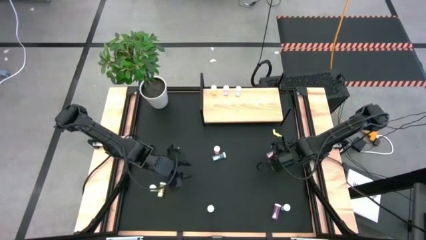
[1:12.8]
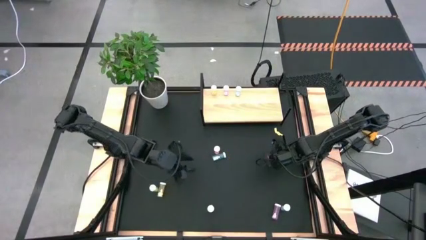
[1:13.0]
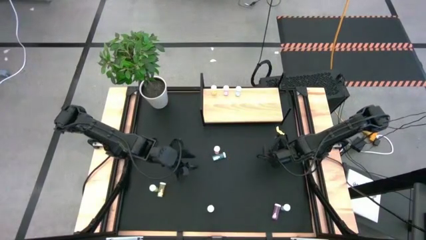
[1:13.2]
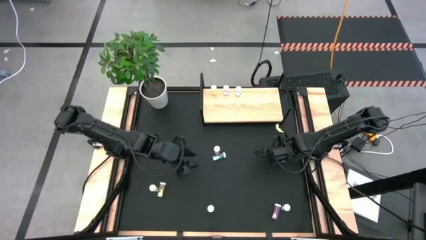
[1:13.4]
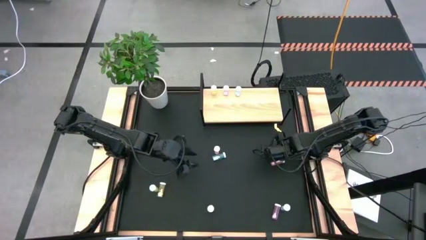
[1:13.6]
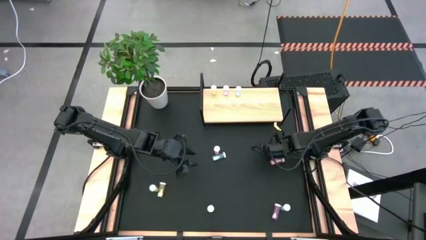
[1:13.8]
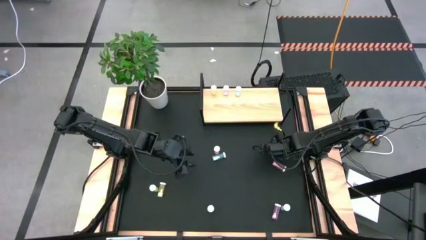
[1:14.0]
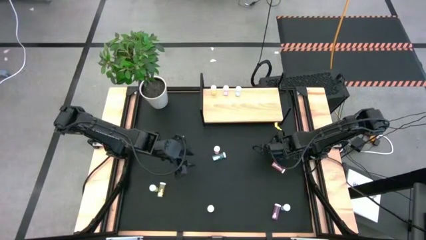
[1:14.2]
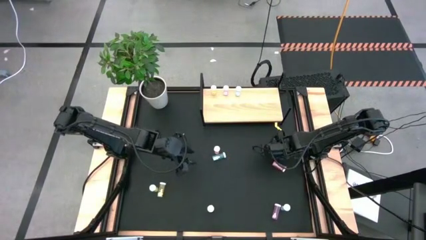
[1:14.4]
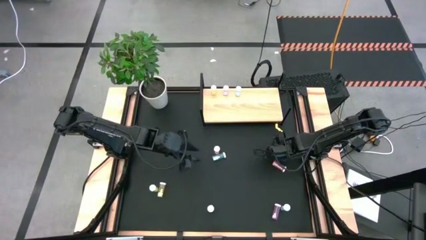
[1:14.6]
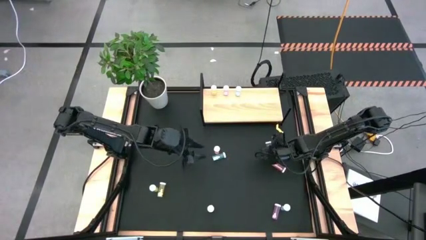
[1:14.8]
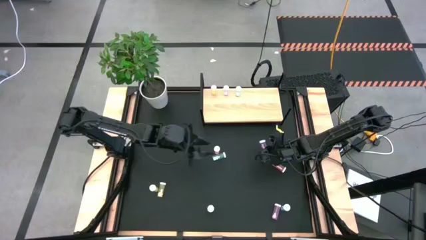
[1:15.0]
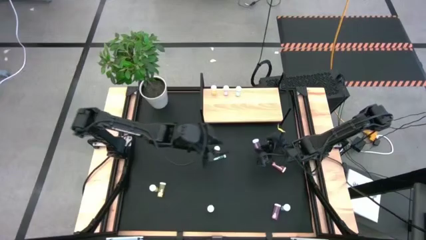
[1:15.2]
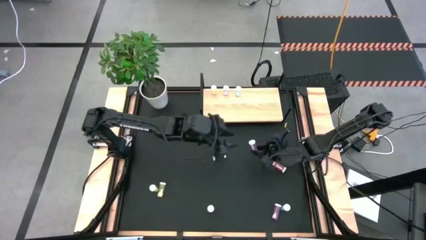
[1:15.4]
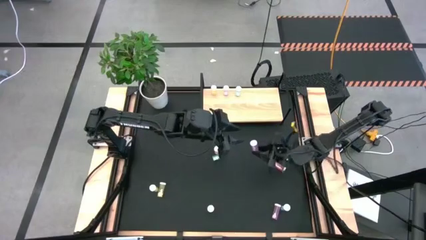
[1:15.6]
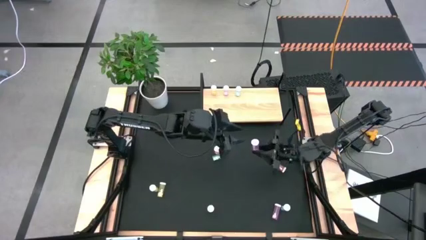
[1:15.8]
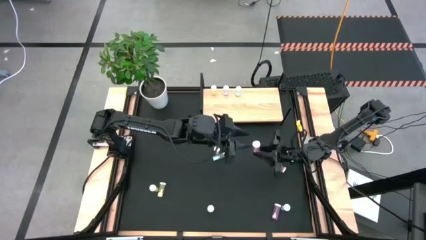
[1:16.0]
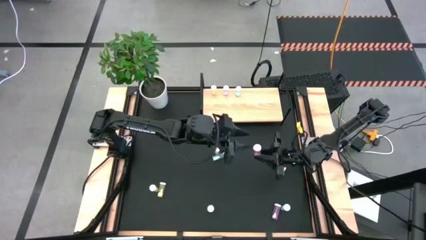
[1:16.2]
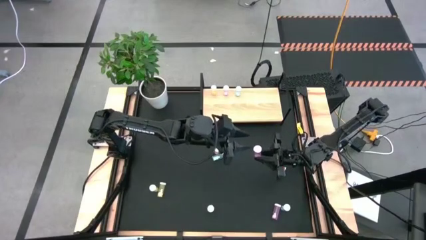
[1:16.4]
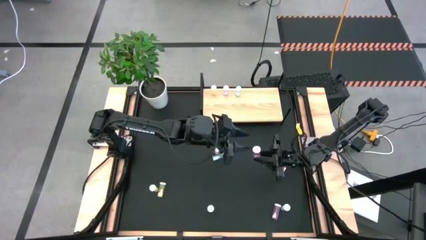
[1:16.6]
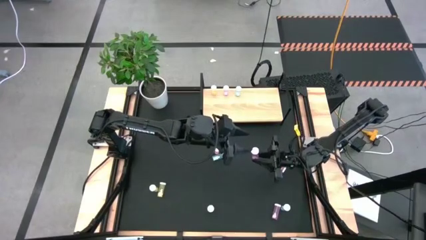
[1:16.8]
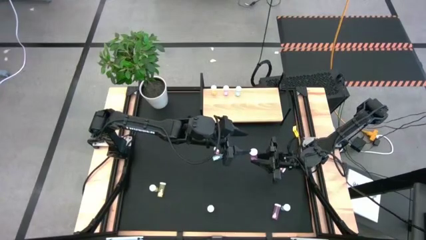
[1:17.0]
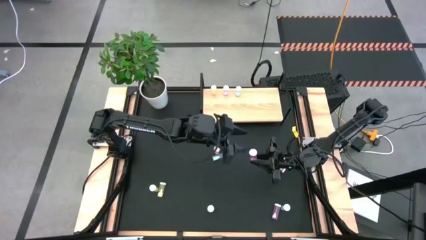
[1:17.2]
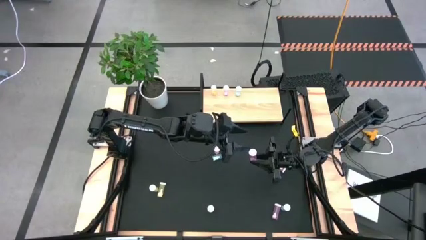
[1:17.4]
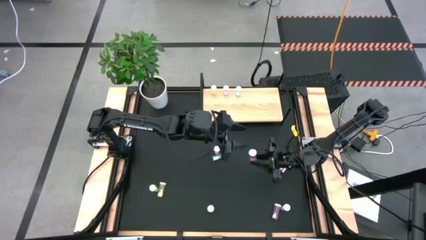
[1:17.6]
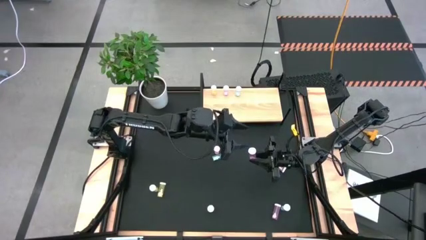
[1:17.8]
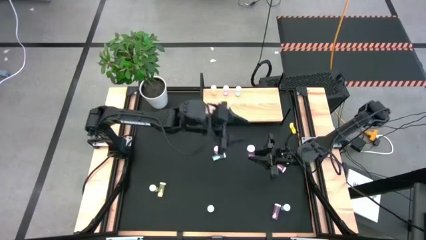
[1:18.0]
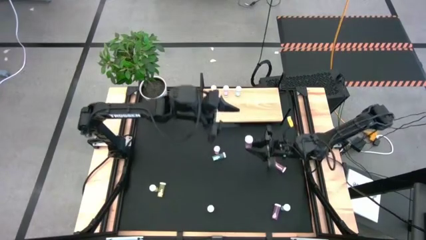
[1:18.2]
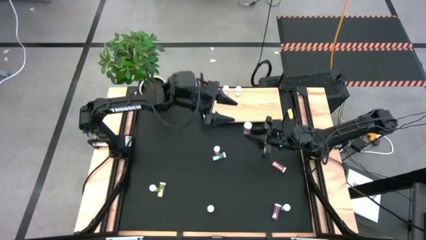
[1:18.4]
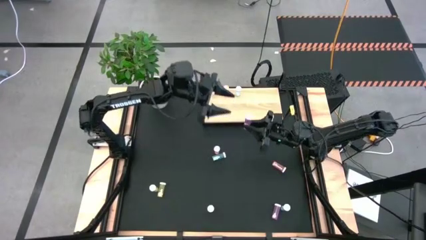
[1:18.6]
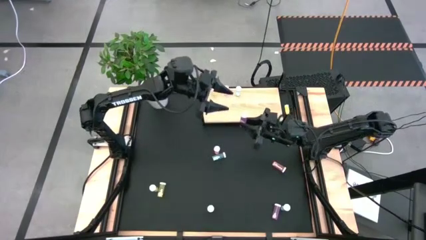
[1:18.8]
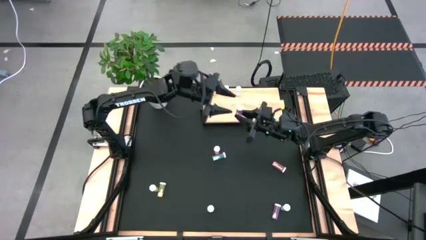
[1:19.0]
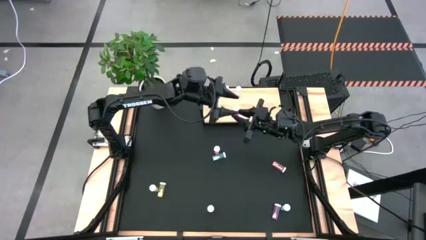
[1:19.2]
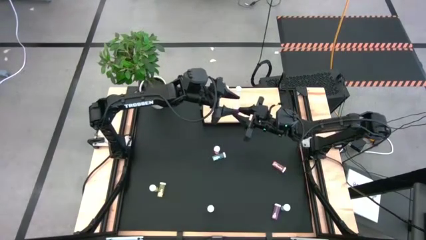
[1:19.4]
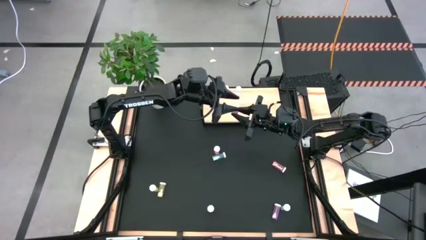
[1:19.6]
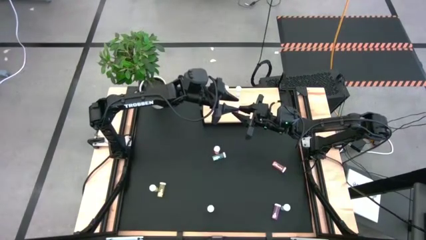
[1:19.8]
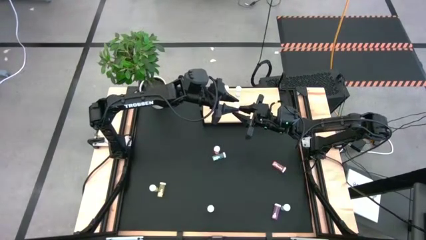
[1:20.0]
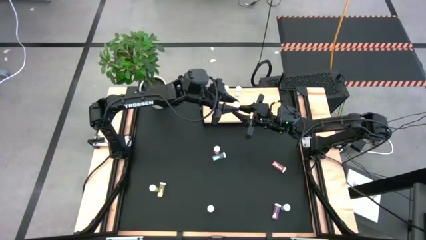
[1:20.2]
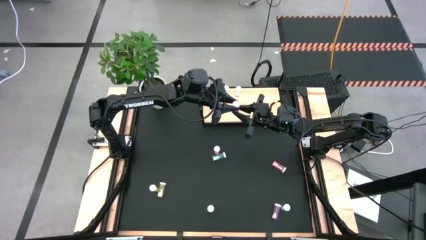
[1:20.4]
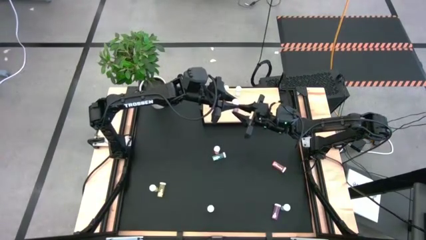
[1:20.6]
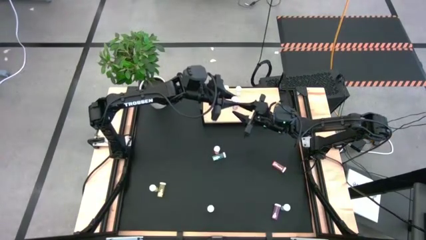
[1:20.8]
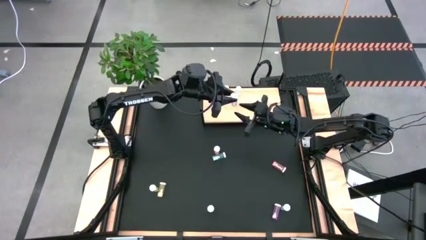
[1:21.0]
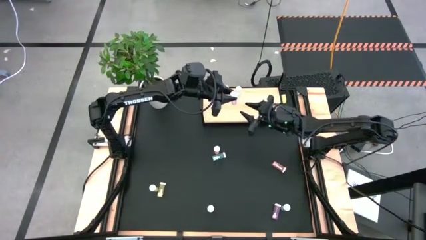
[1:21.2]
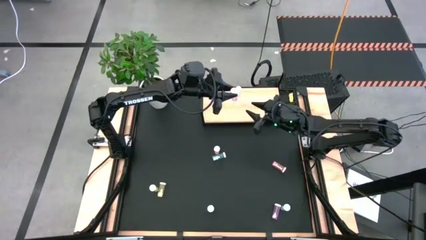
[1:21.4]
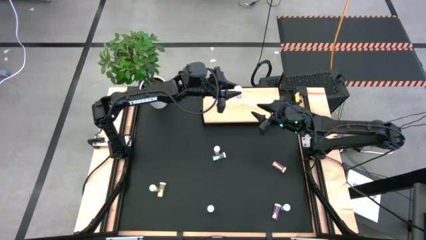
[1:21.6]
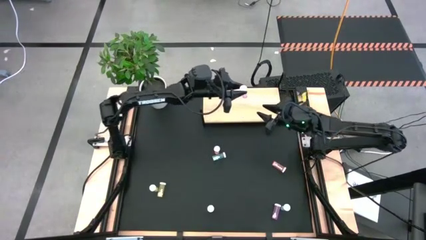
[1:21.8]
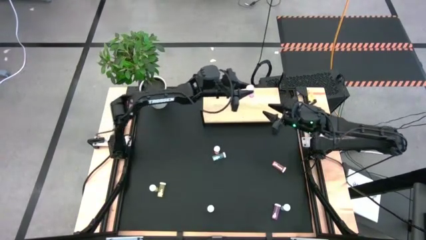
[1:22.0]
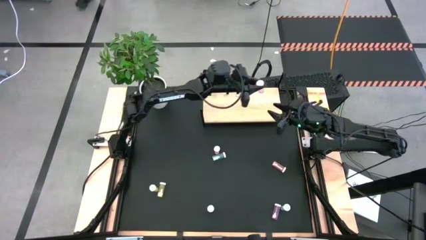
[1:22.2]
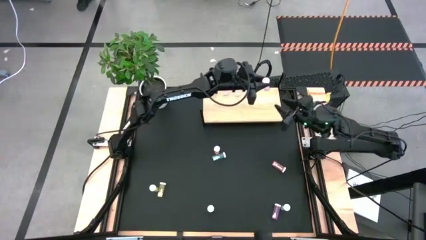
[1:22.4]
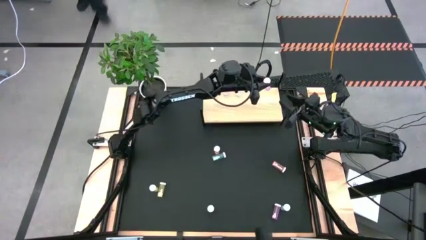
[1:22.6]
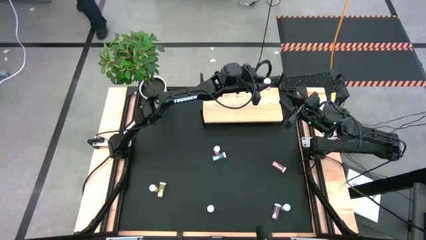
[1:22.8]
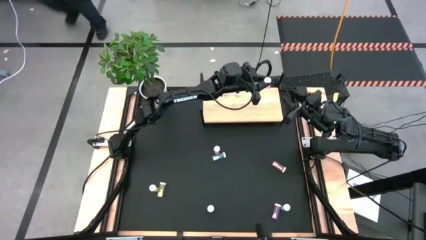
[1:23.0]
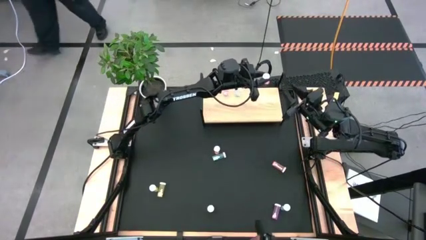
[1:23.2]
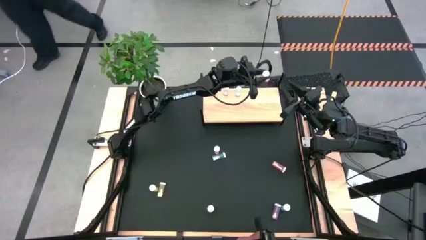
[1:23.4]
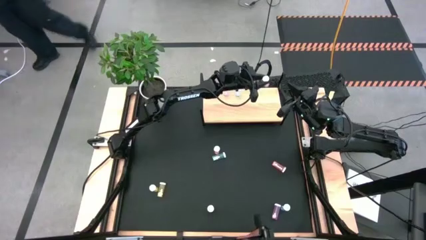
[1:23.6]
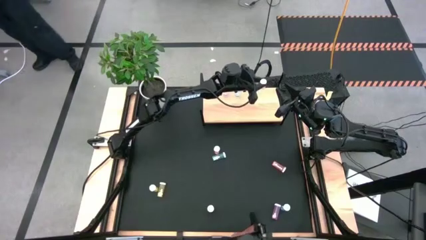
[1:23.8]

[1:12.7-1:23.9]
Task: Pick and place medicine bottles onto shelf by color
Put the top pink pill bottle on the shelf aligned with the other pink pill bottle

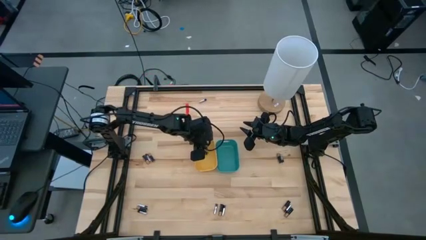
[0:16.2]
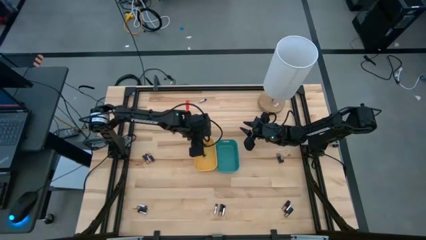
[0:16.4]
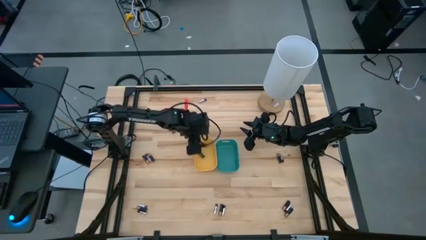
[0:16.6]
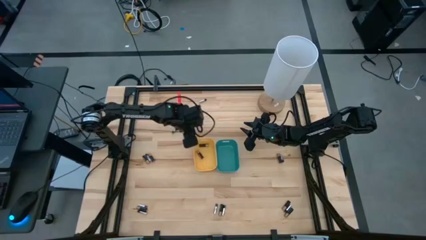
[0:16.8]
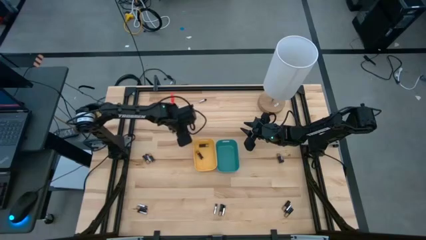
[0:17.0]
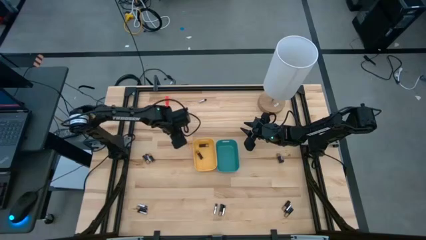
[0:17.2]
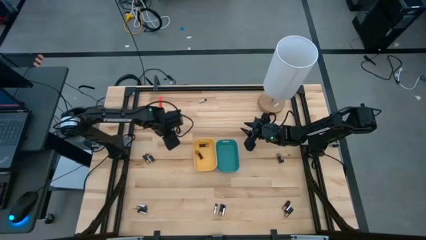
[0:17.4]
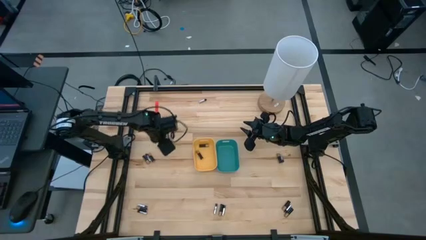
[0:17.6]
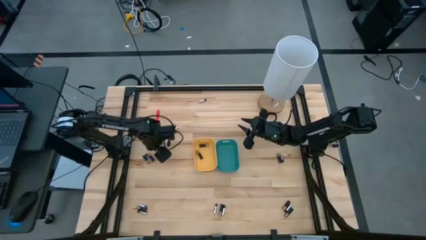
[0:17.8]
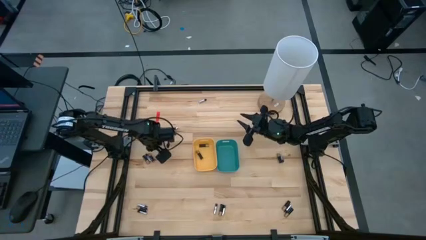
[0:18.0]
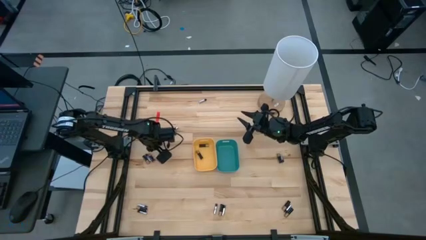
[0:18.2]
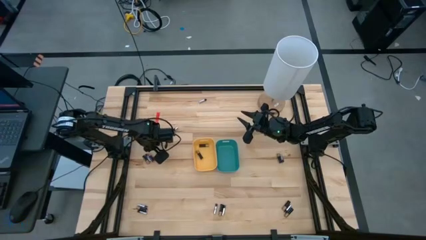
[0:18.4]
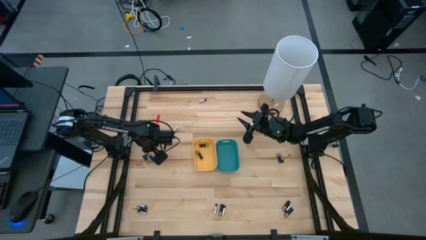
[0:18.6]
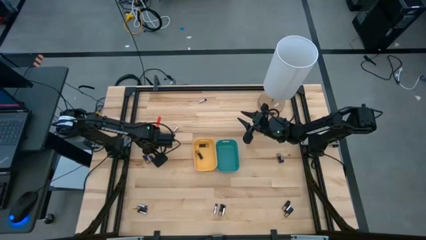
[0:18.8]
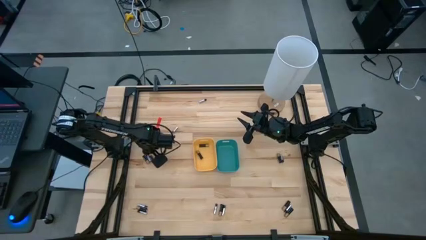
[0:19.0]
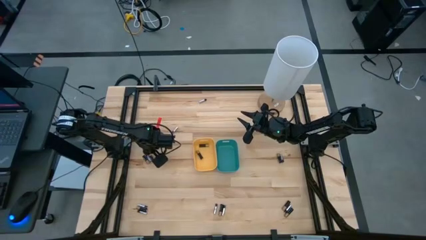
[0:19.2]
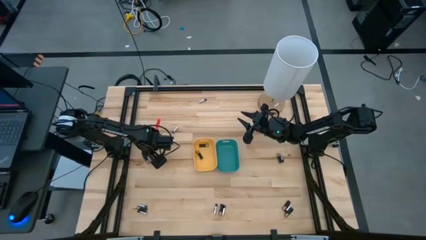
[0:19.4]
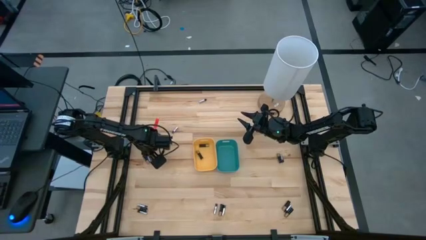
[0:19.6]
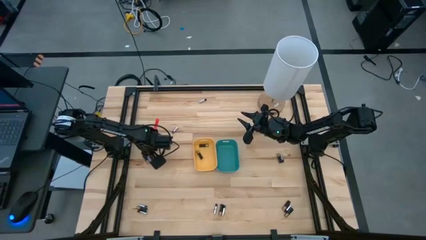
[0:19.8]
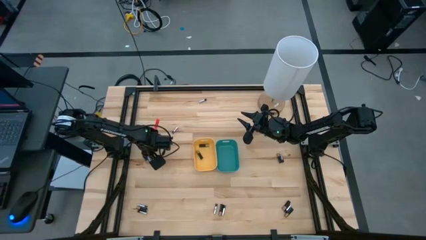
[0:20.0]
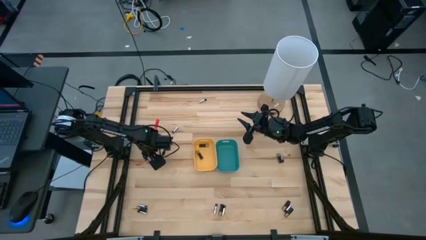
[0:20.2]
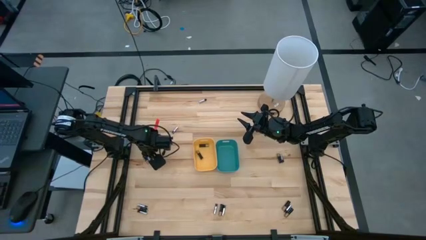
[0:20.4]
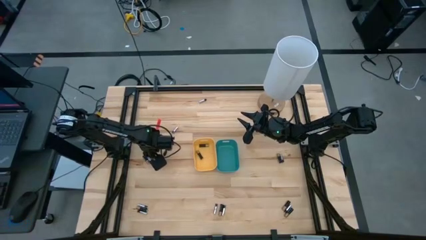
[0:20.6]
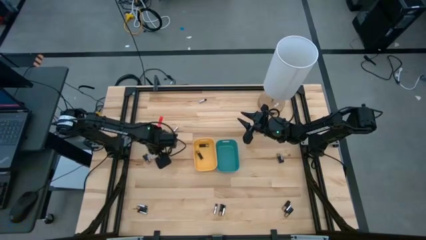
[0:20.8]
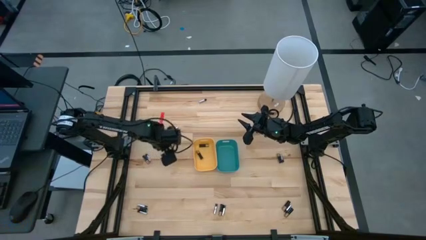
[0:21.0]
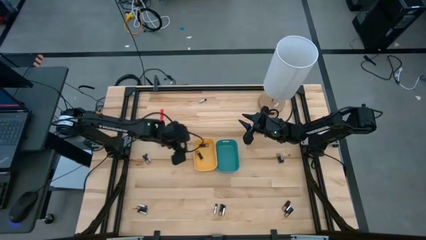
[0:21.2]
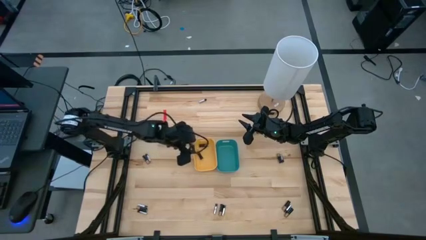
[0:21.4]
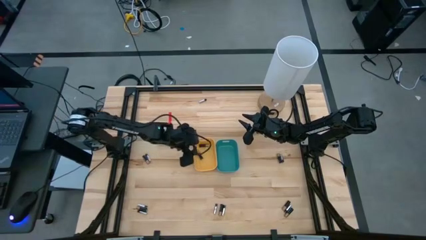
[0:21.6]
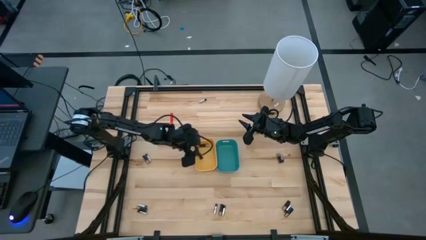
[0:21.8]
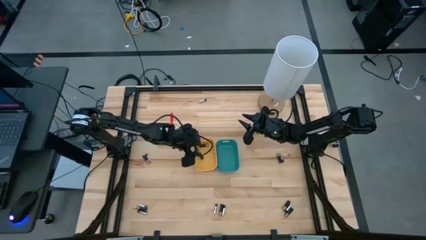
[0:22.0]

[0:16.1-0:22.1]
Task: Sort batteries
Put the black battery into the yellow bin
